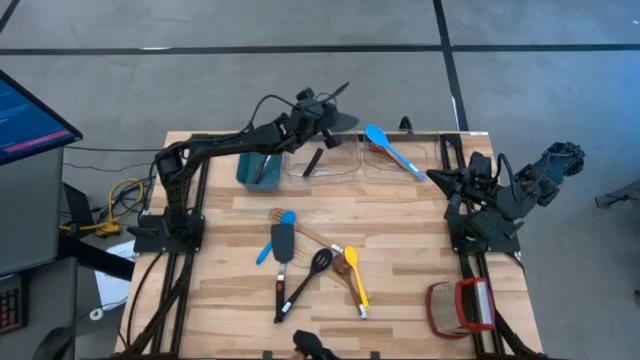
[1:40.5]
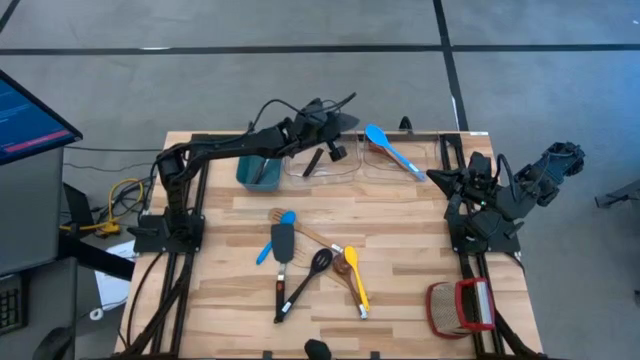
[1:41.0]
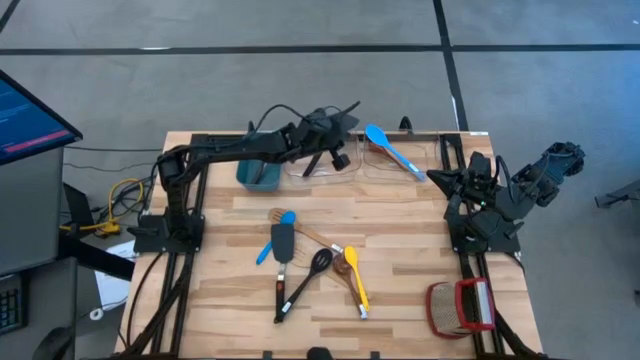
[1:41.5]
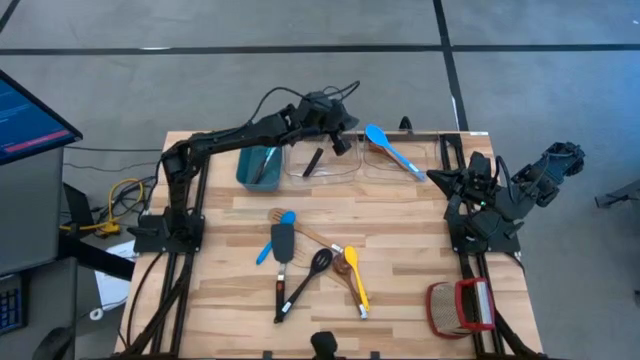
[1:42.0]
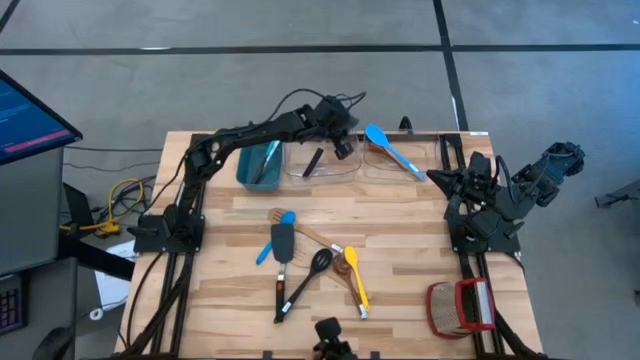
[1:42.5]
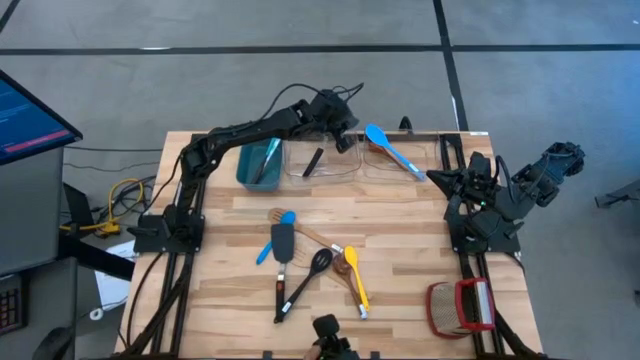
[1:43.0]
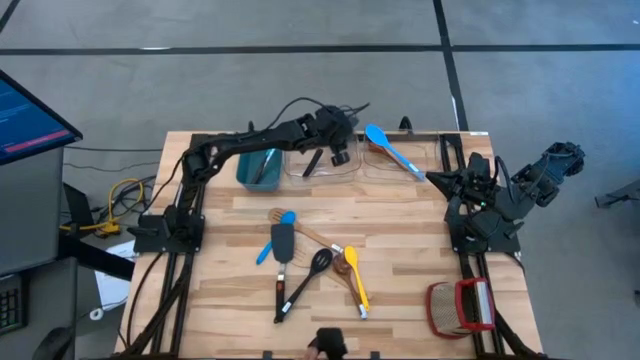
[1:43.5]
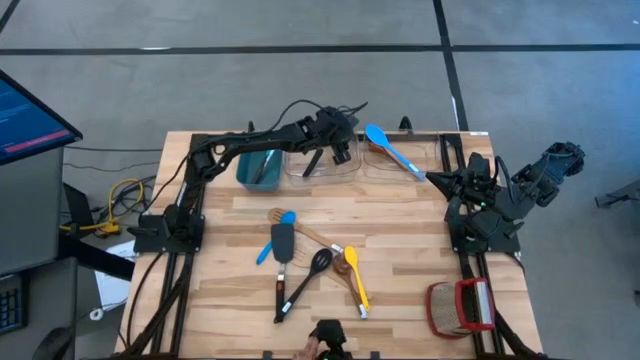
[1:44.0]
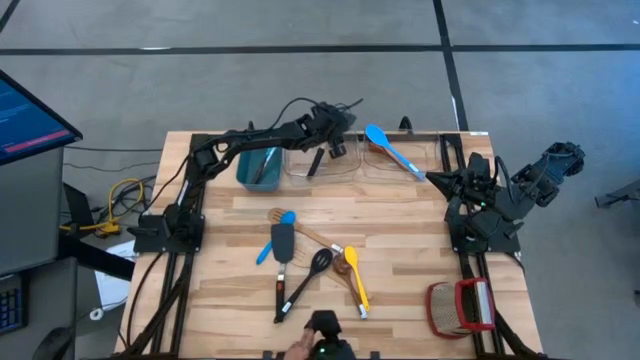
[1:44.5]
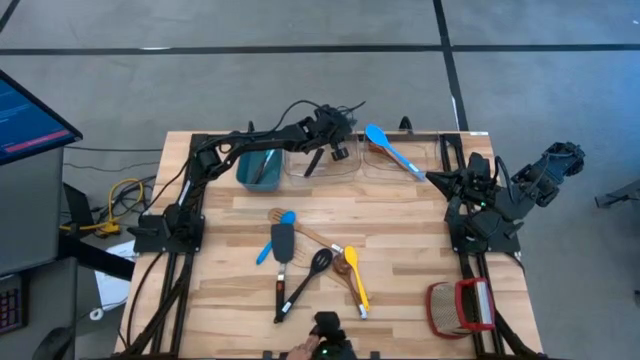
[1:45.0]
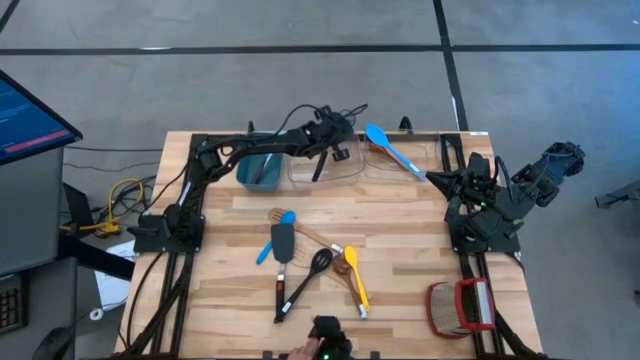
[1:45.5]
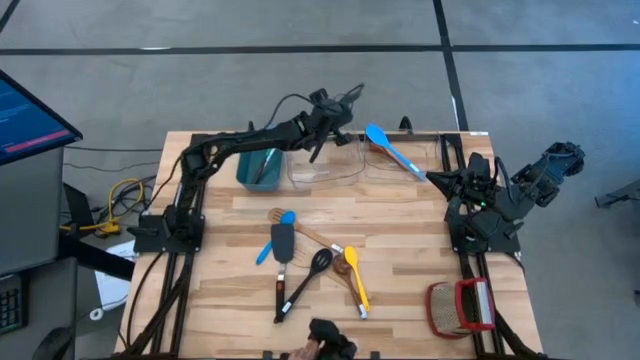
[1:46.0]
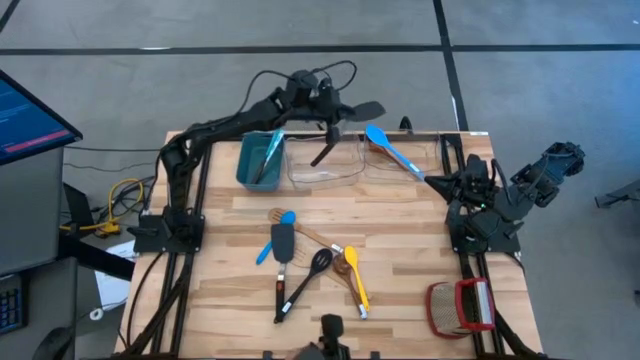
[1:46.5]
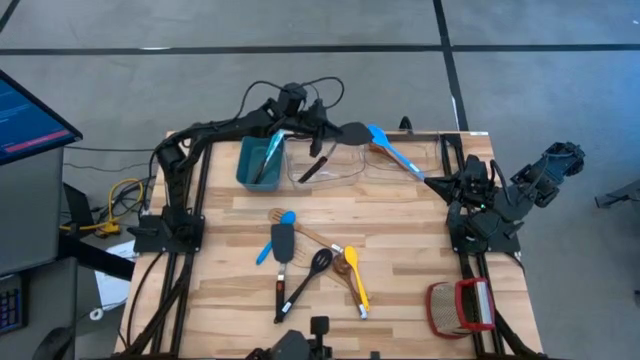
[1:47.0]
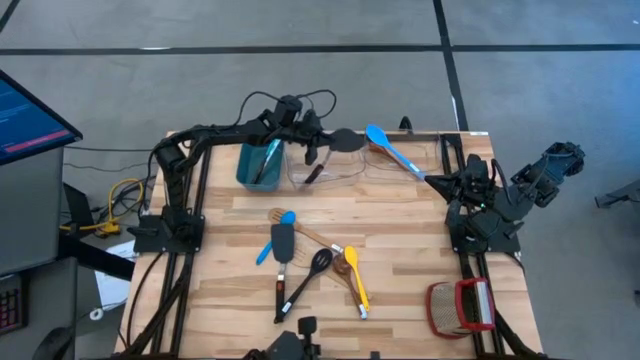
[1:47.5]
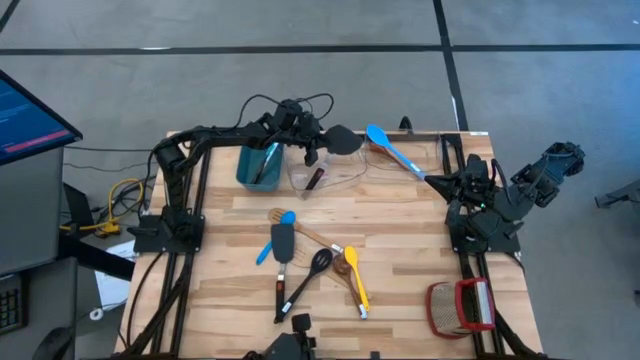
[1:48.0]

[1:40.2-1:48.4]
Task: Pick & Place Kitchen Items
Put the black spatula into the left transparent bin

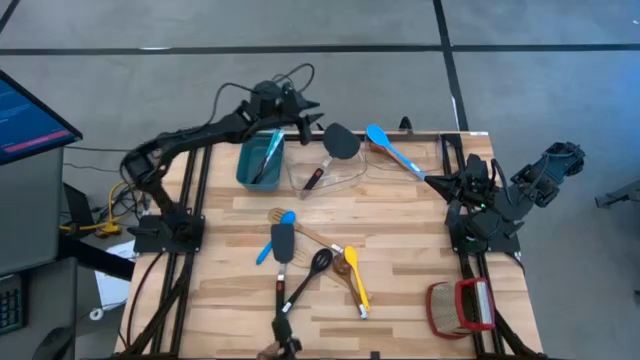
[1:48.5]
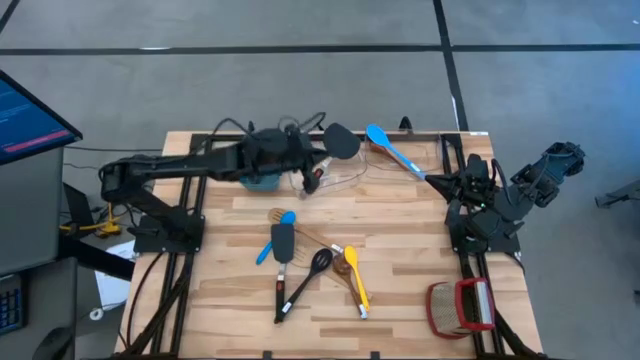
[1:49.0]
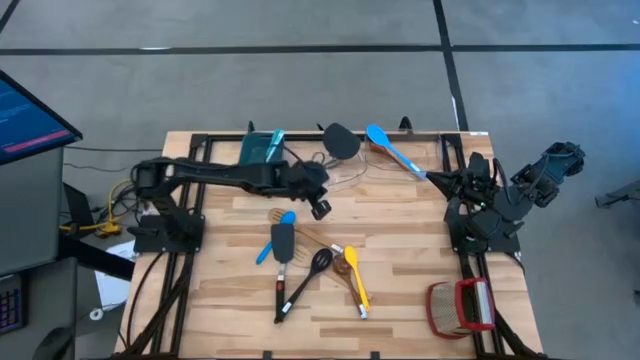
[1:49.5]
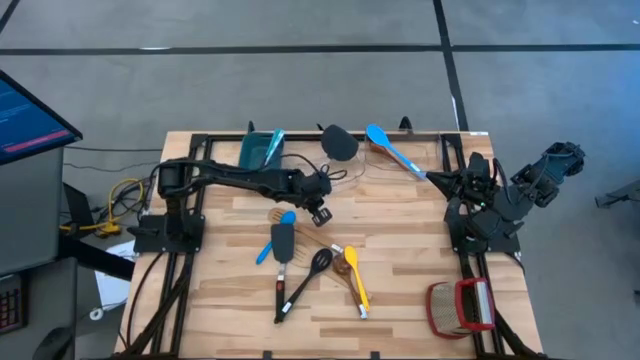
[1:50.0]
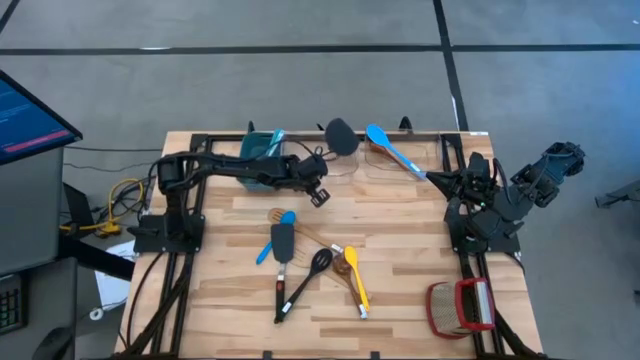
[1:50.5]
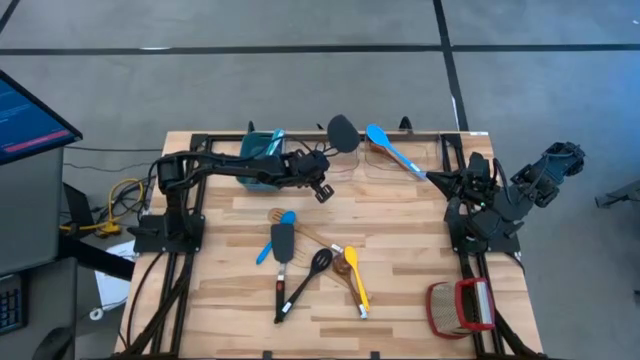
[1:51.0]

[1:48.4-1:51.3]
Adjust the left transparent bin

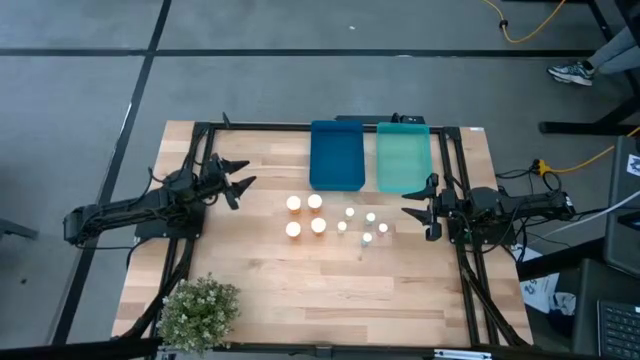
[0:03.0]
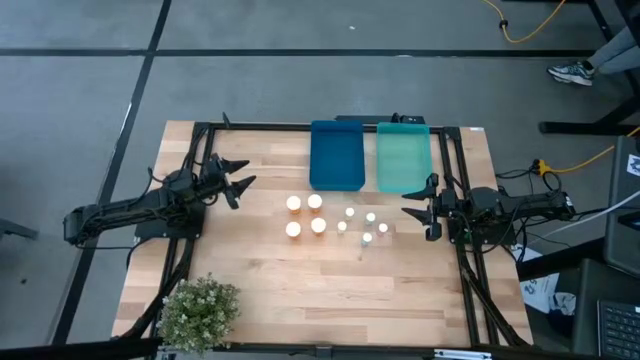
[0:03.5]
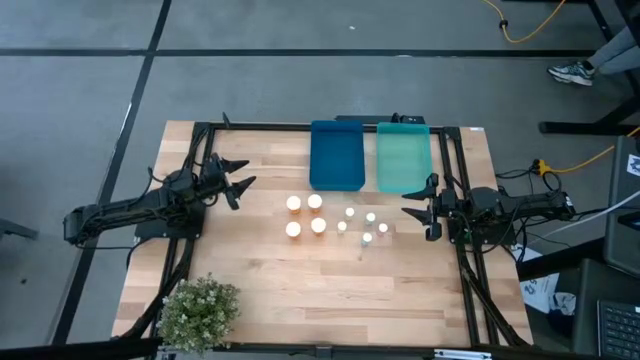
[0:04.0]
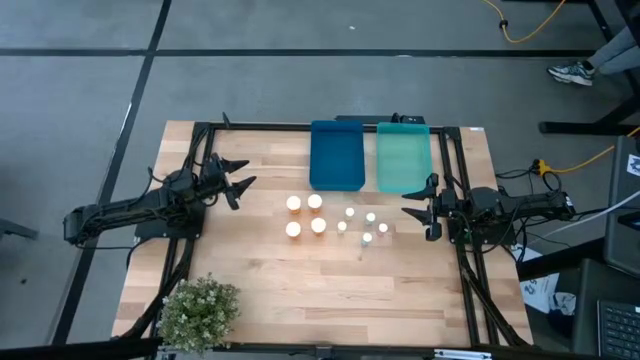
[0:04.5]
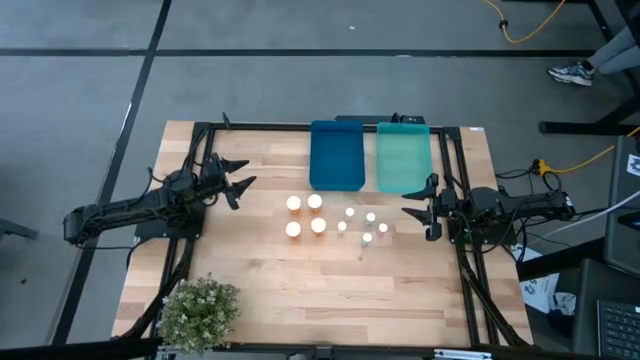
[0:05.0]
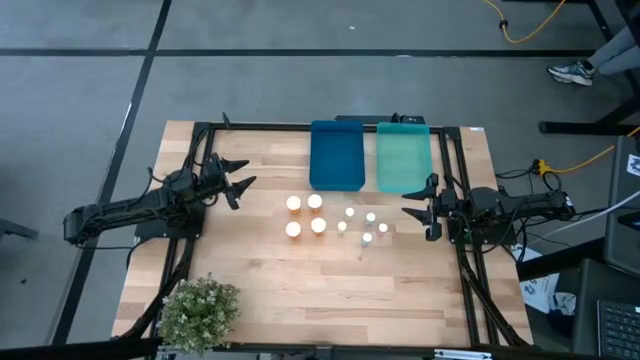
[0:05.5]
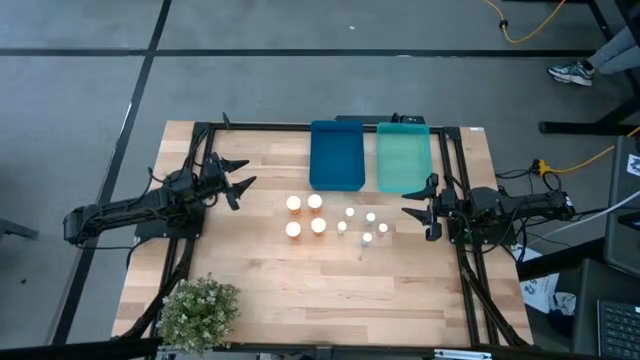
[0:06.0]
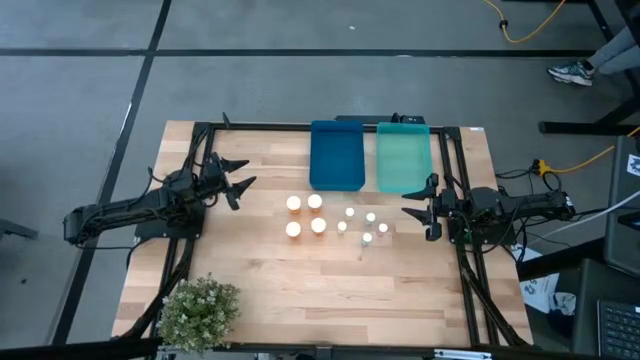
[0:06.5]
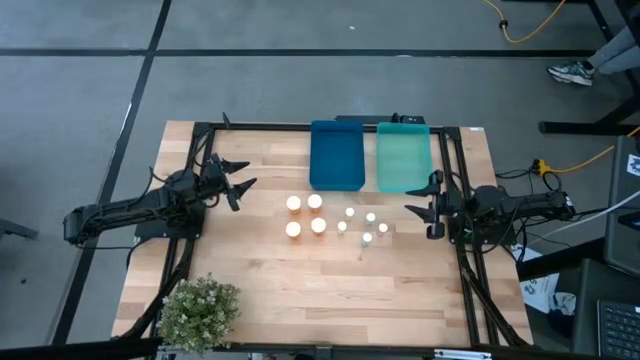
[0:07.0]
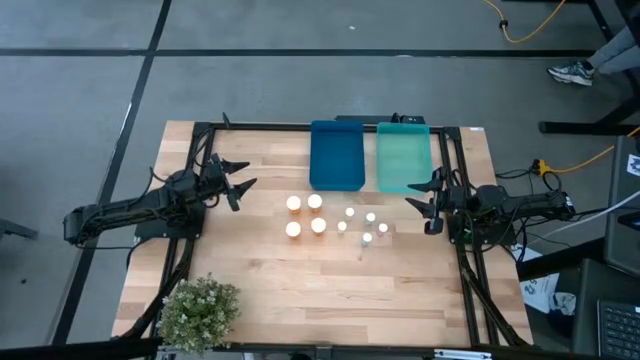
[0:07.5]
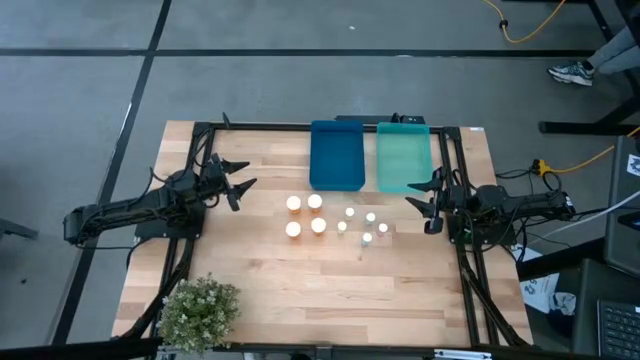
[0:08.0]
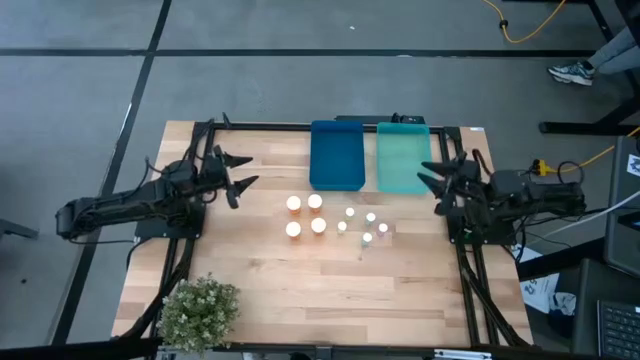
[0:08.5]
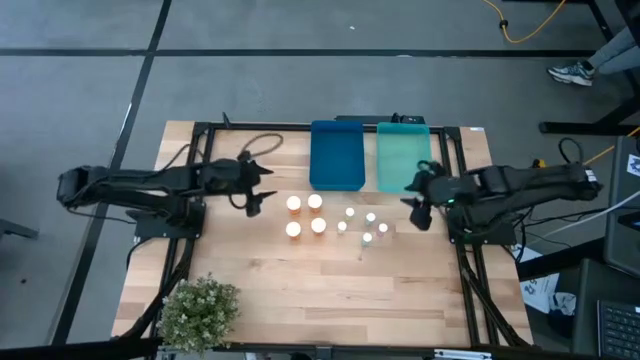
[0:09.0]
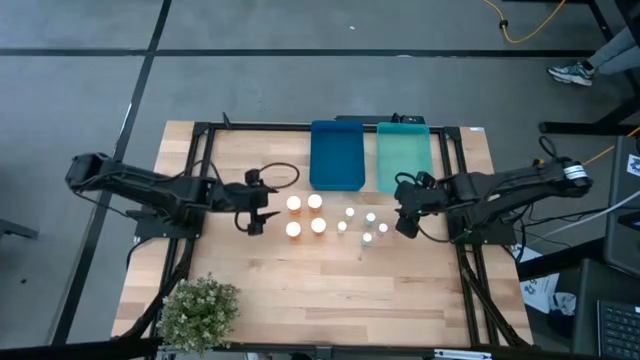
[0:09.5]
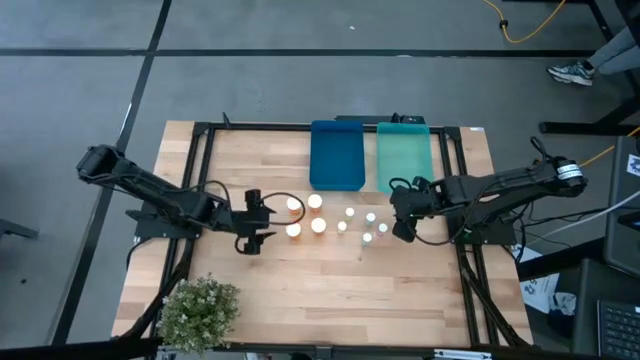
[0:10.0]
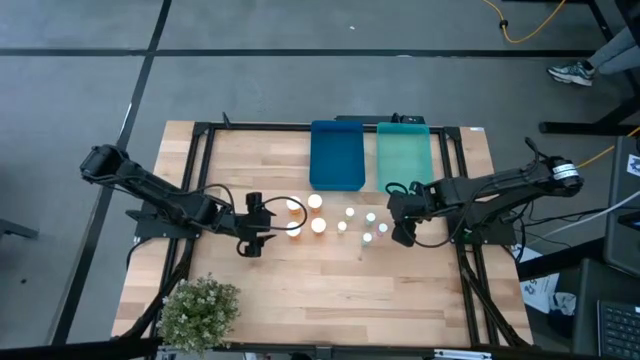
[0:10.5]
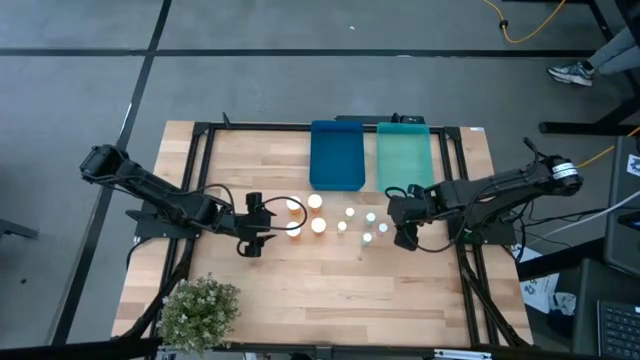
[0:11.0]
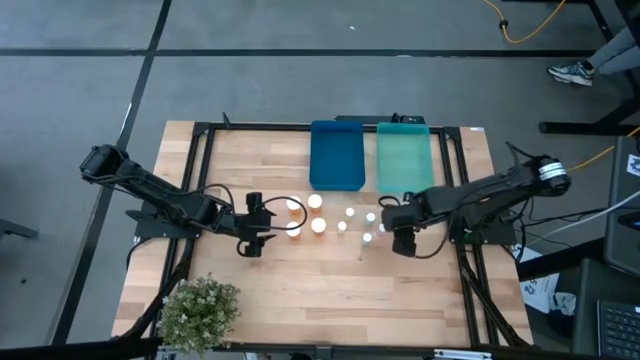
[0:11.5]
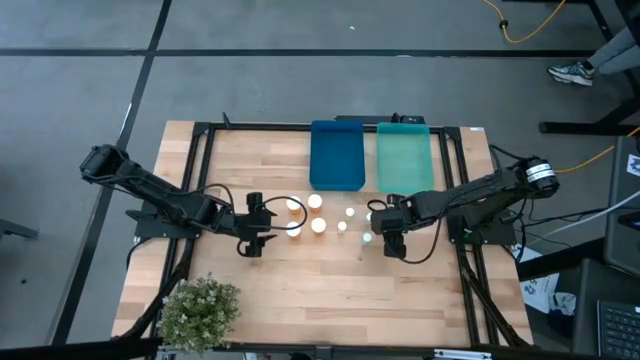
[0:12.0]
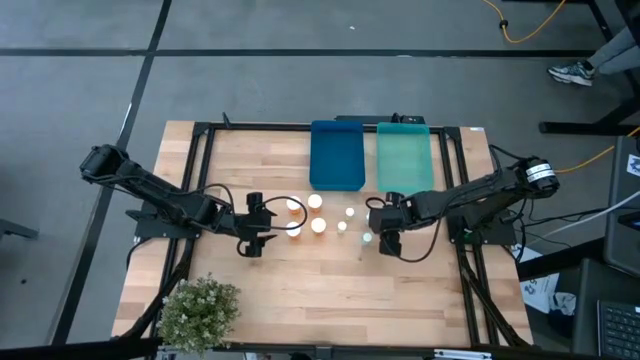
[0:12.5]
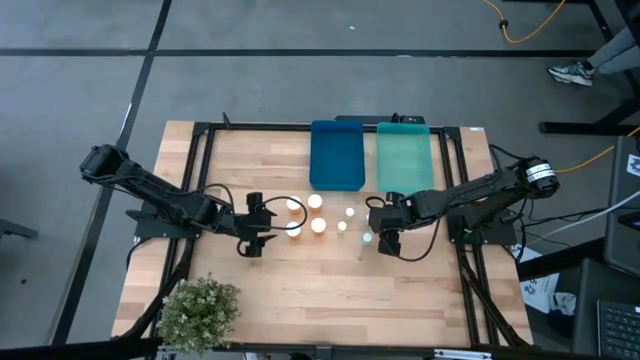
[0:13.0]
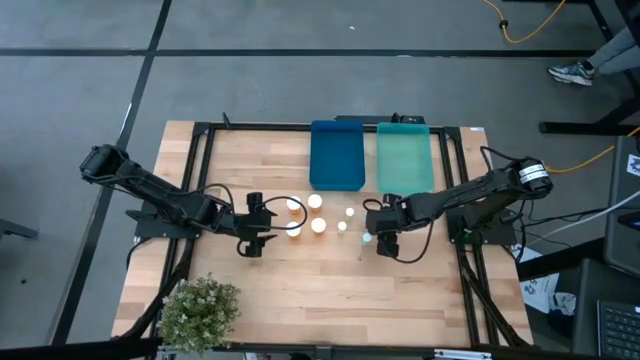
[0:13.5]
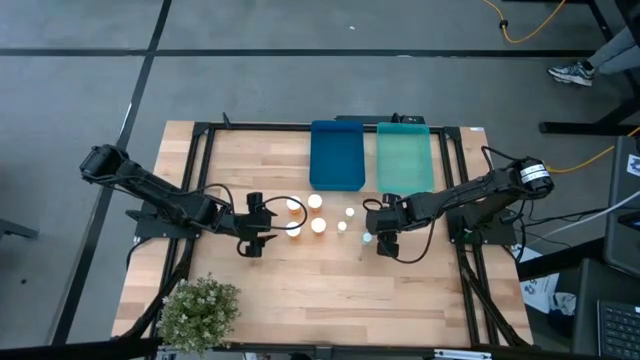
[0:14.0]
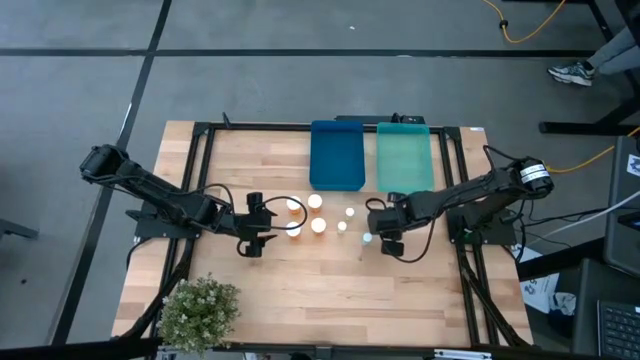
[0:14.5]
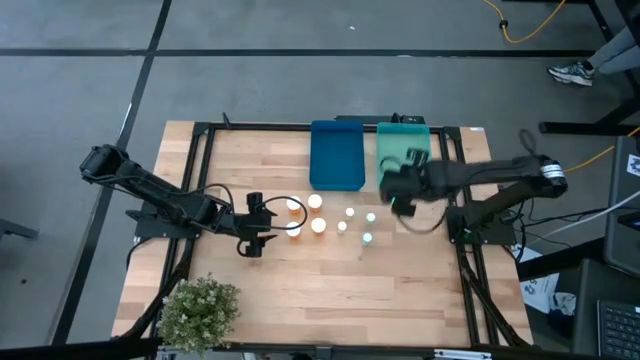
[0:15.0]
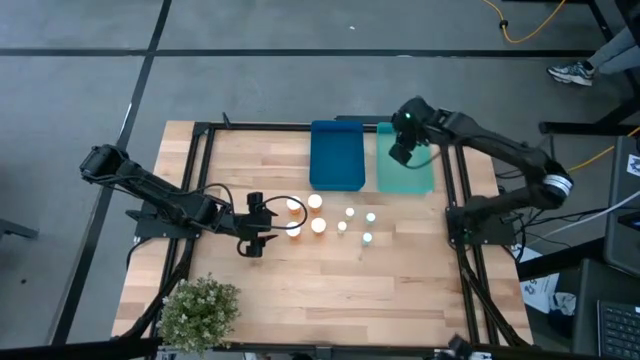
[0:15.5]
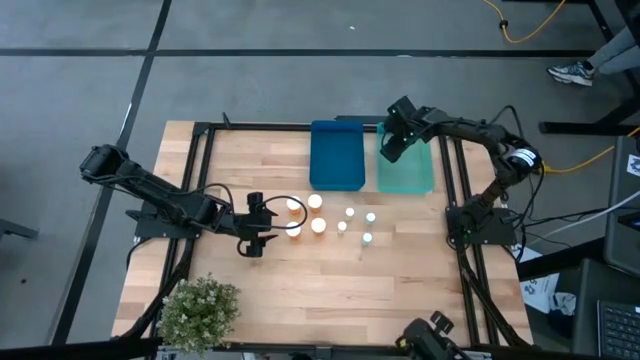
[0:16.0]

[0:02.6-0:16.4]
Task: Pick and place medicine bottles into bin by pill shape (circle, oval)
Put the pink pill bottle into the green transparent bin
